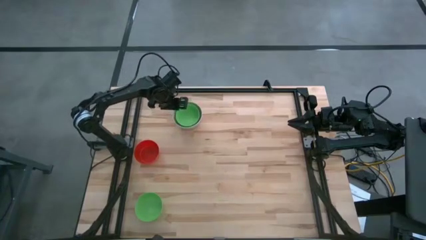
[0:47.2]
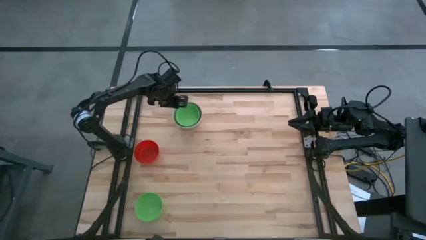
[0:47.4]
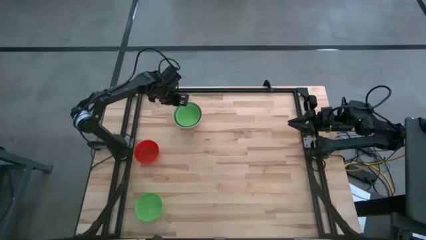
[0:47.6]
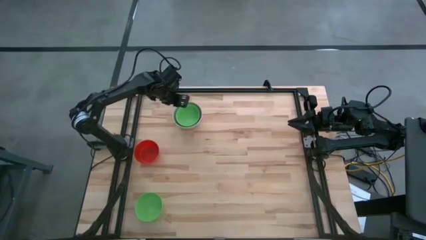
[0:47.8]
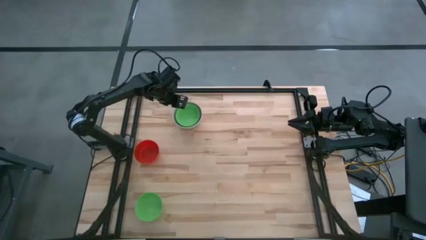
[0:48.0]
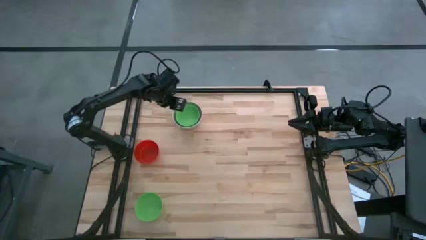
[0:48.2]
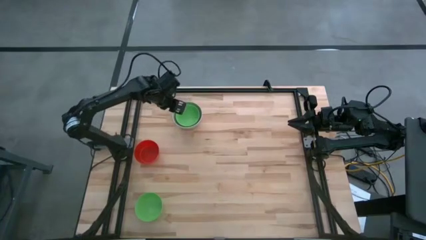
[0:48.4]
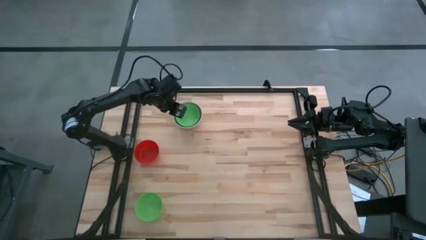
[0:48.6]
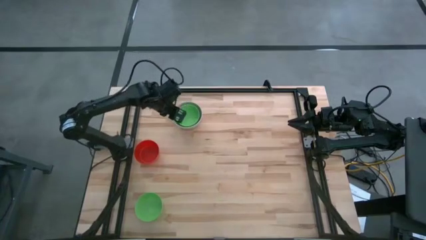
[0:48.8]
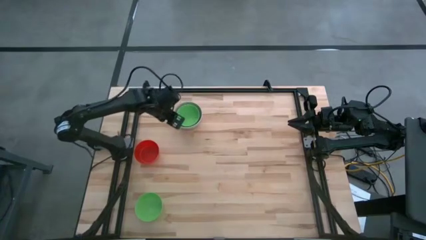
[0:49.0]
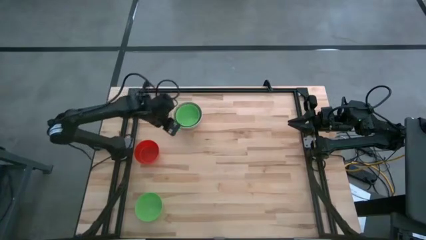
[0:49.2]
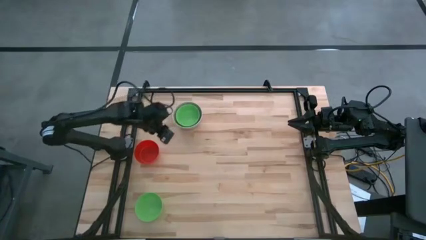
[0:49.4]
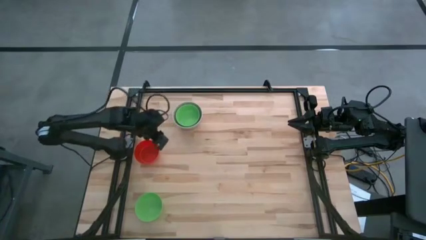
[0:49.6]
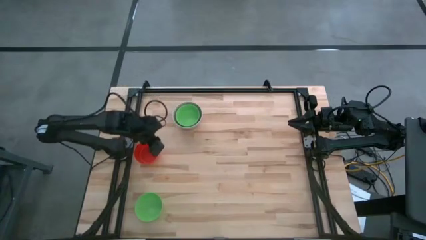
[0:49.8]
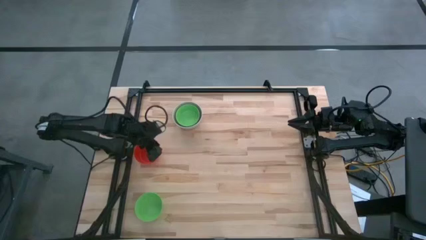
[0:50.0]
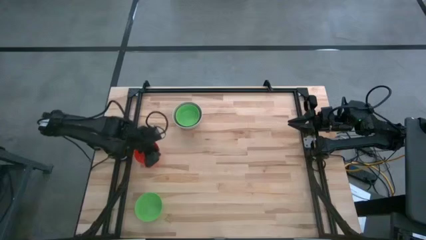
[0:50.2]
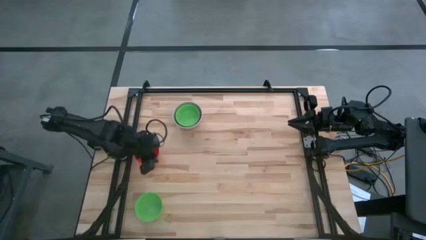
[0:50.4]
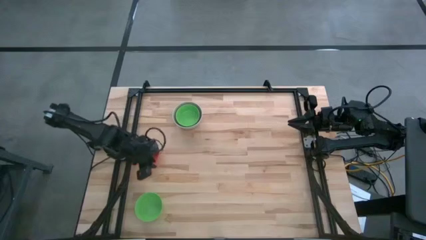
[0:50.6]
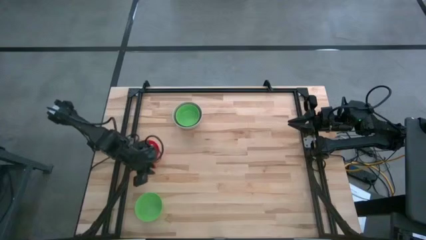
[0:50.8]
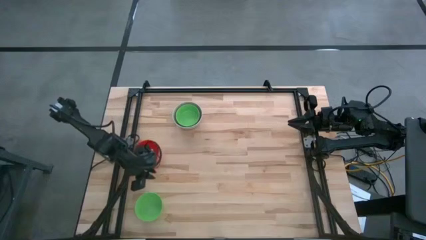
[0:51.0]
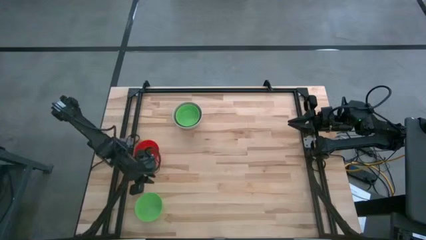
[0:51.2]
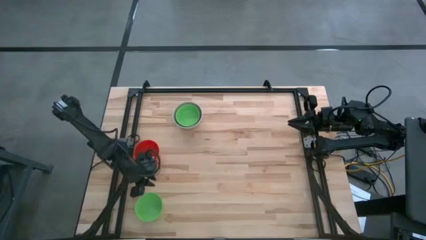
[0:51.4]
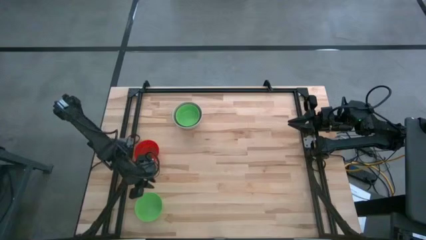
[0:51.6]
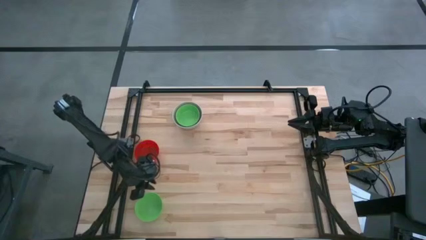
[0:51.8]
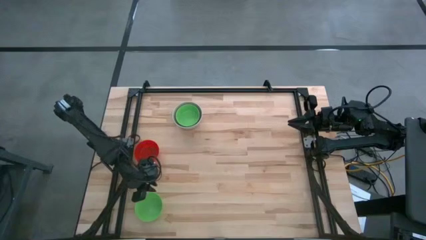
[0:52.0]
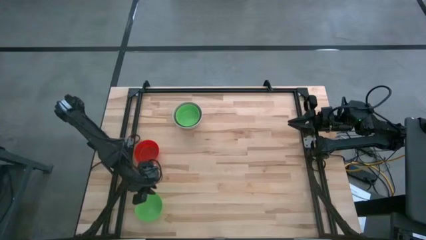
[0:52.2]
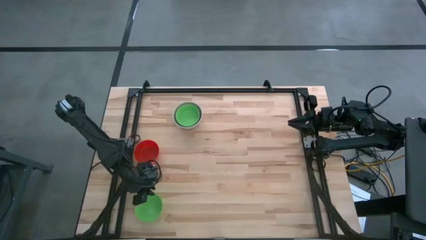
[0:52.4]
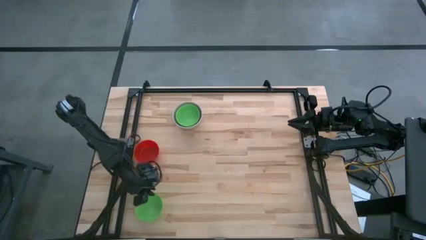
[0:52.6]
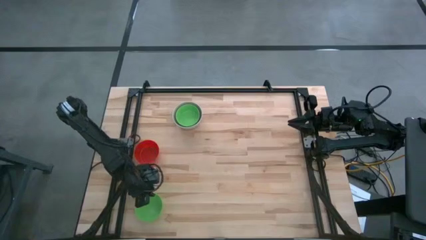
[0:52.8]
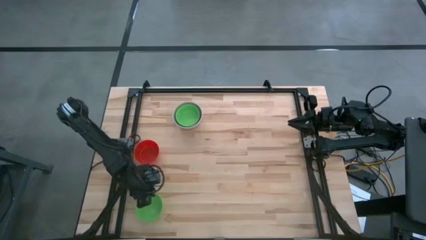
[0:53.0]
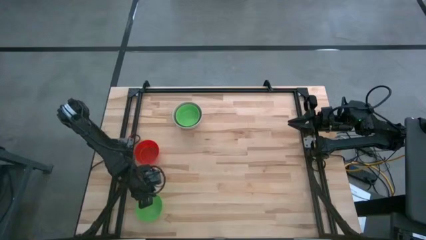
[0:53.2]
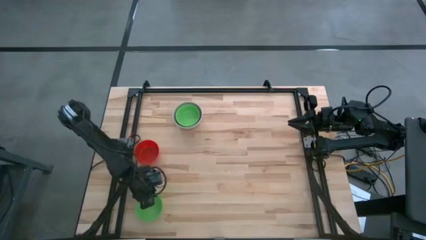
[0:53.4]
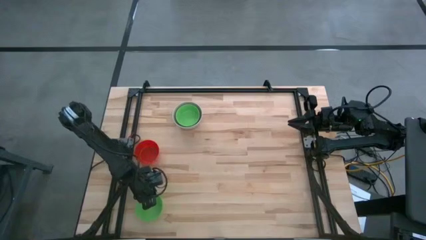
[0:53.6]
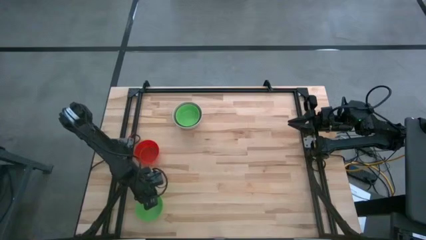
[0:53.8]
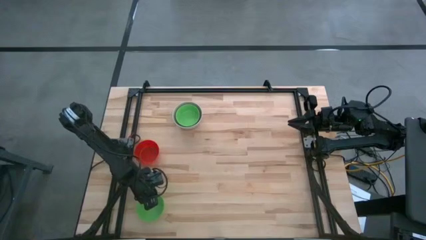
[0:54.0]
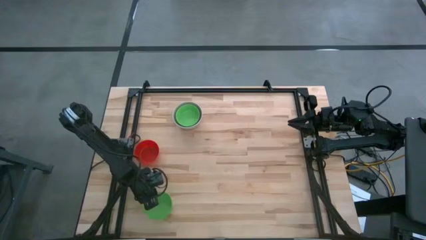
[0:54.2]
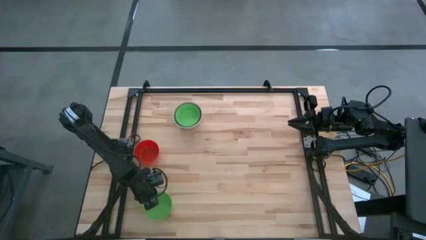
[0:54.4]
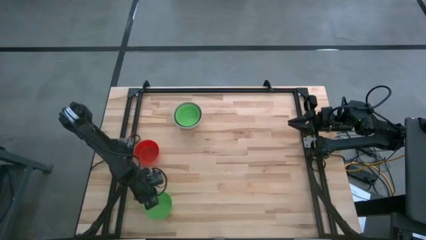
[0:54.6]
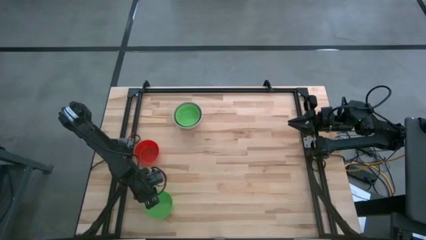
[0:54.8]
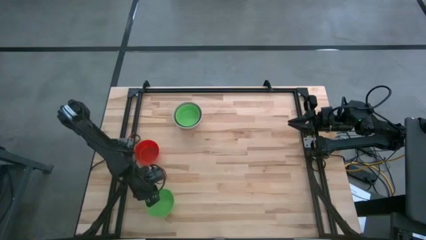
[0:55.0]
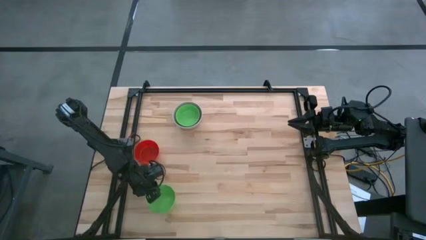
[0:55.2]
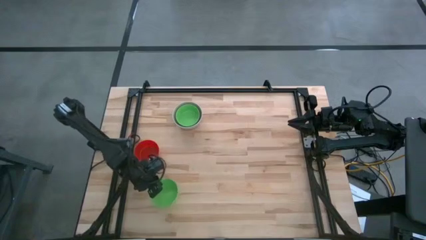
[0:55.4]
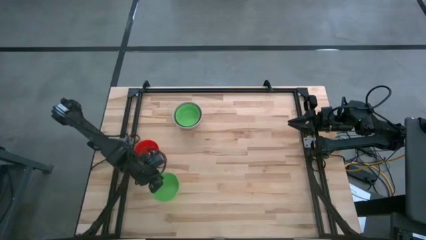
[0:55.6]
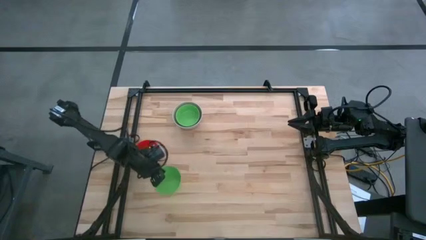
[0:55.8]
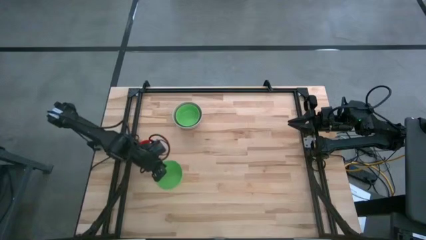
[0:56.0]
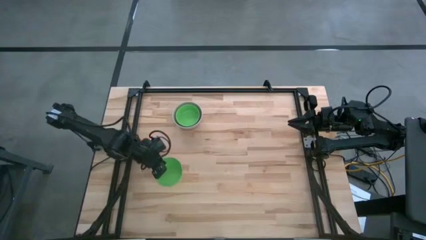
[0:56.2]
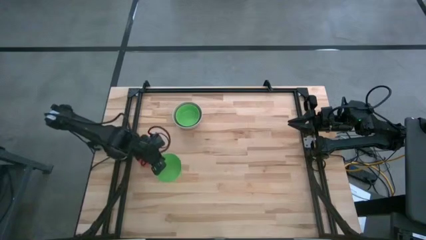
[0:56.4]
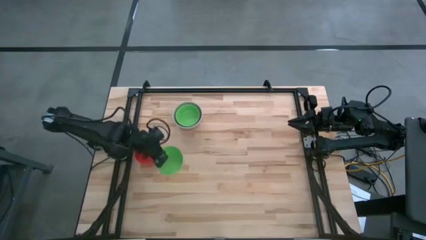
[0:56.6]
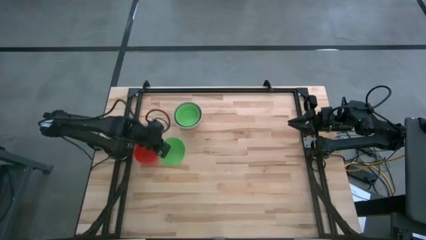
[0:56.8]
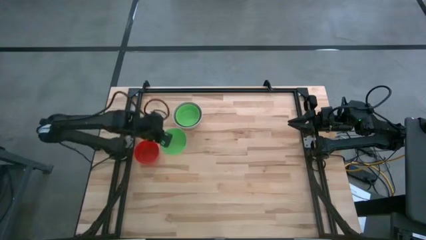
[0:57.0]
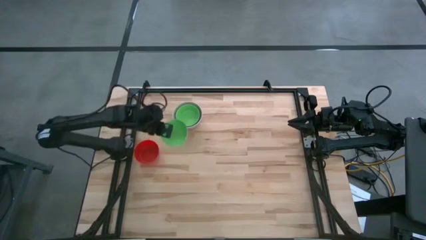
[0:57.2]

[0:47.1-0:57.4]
Stack the bottom green bowl on the top green bowl
